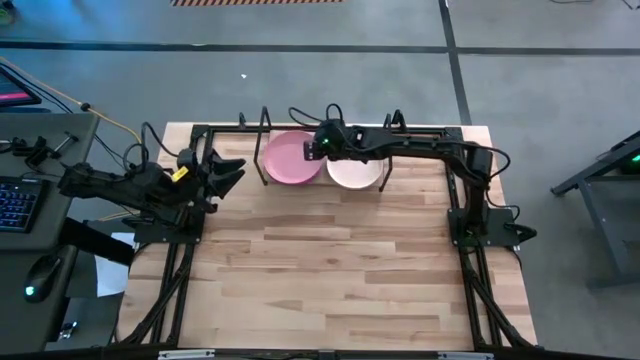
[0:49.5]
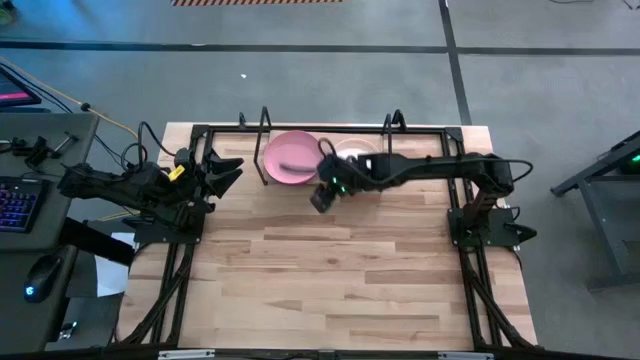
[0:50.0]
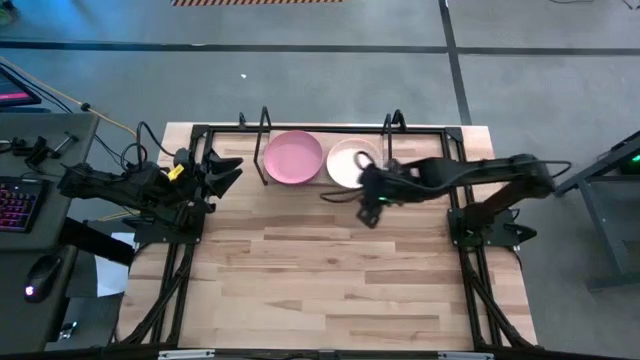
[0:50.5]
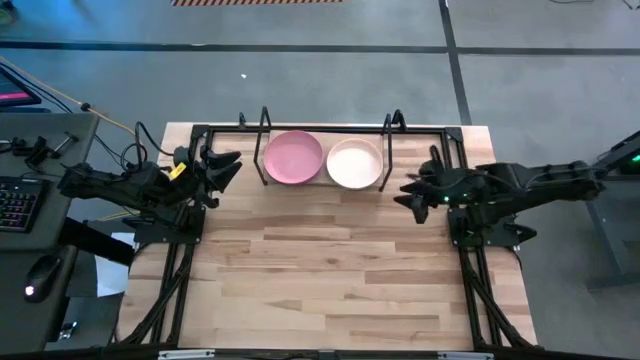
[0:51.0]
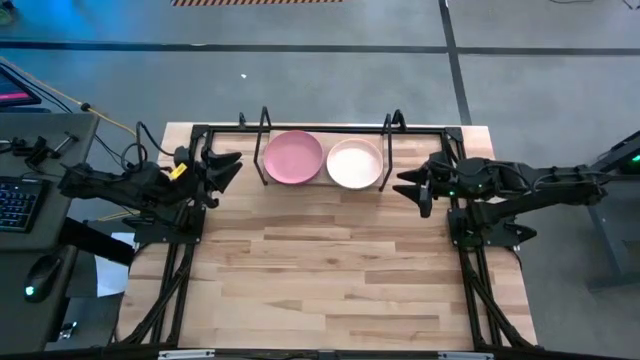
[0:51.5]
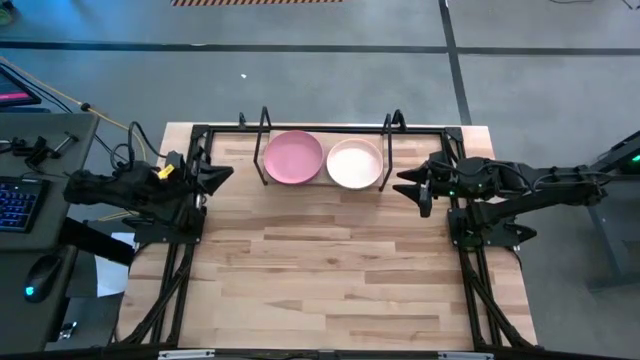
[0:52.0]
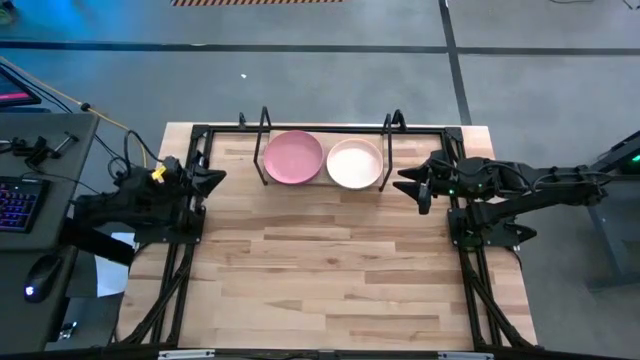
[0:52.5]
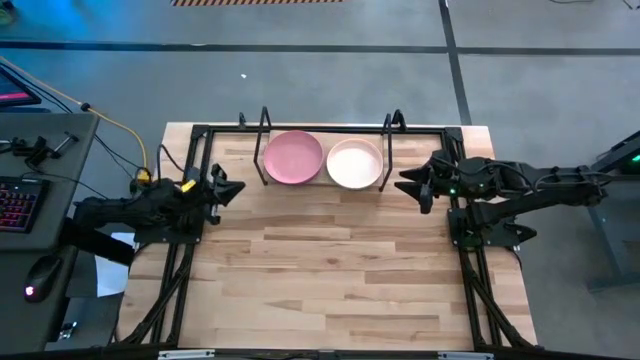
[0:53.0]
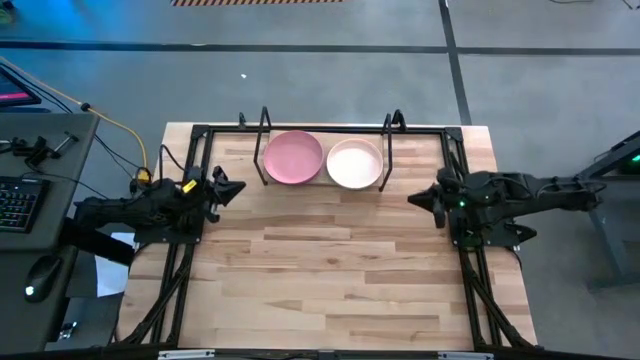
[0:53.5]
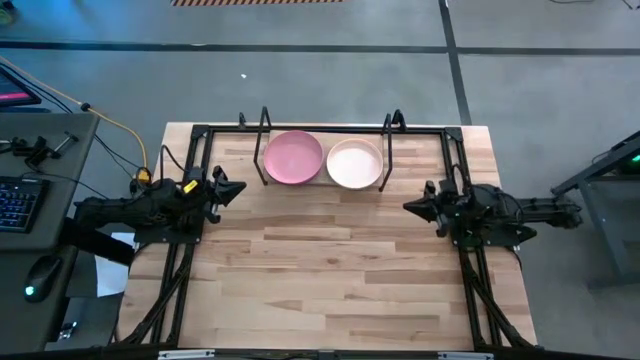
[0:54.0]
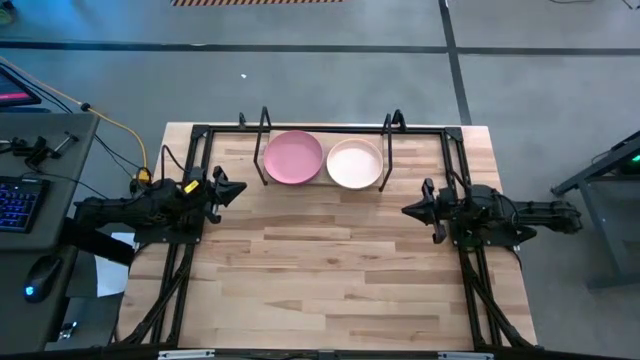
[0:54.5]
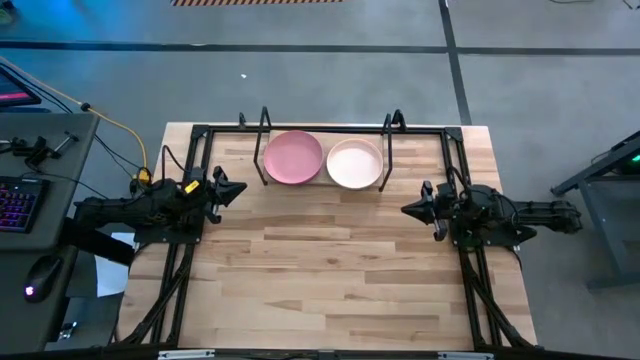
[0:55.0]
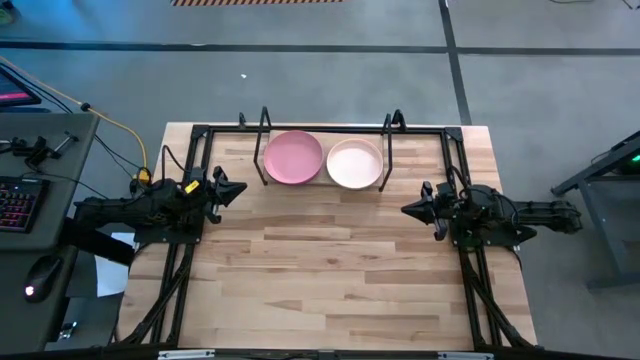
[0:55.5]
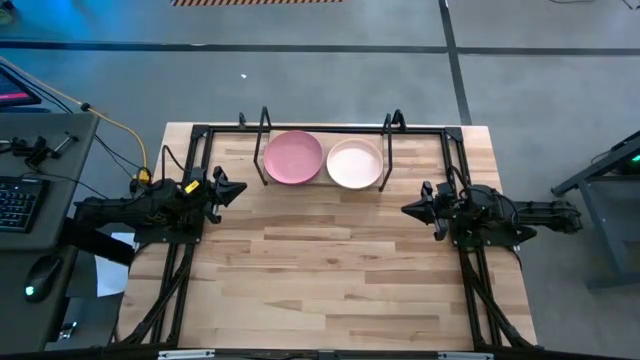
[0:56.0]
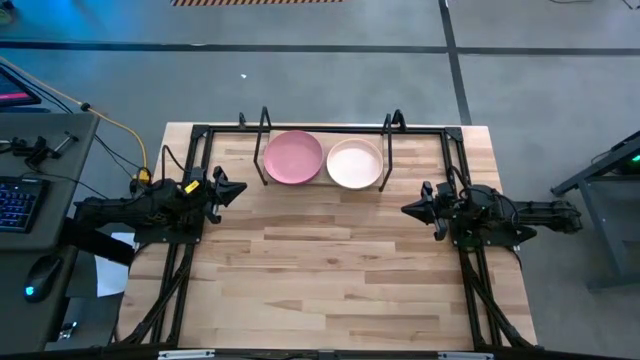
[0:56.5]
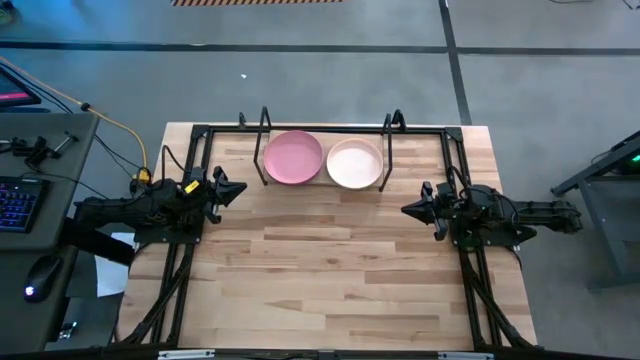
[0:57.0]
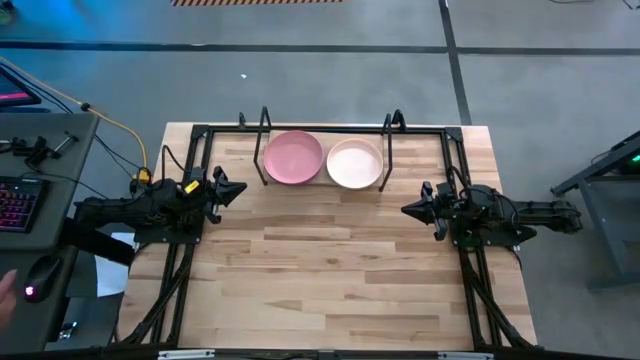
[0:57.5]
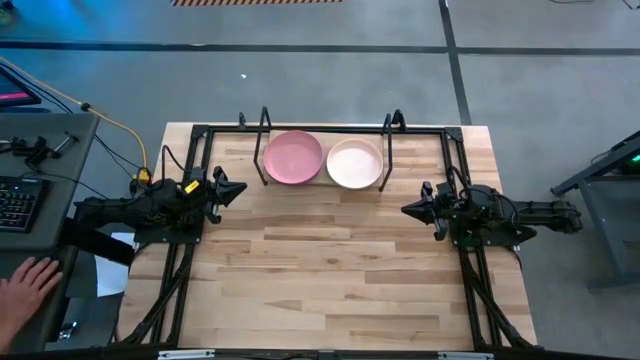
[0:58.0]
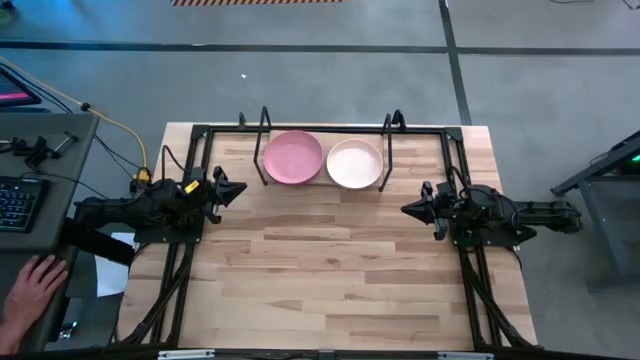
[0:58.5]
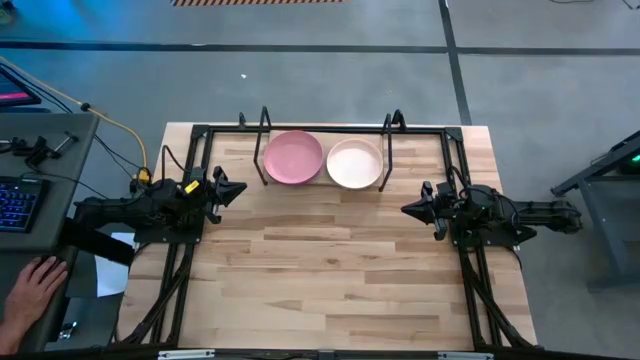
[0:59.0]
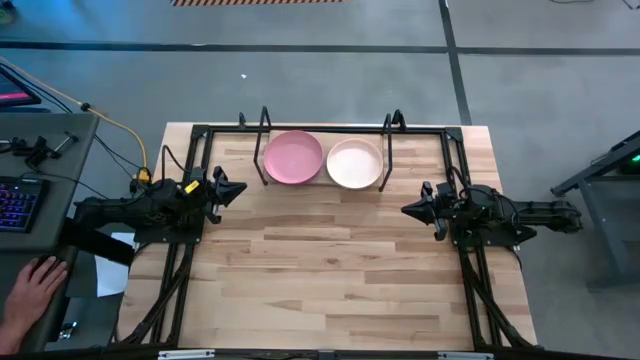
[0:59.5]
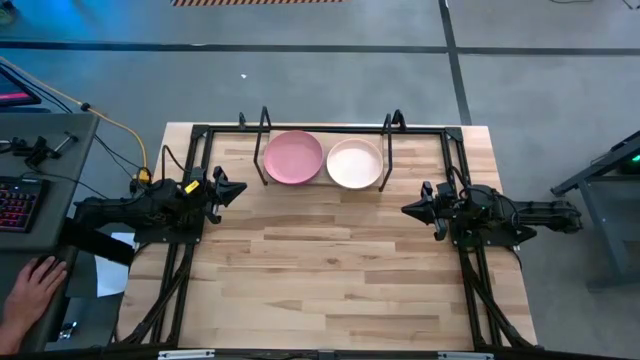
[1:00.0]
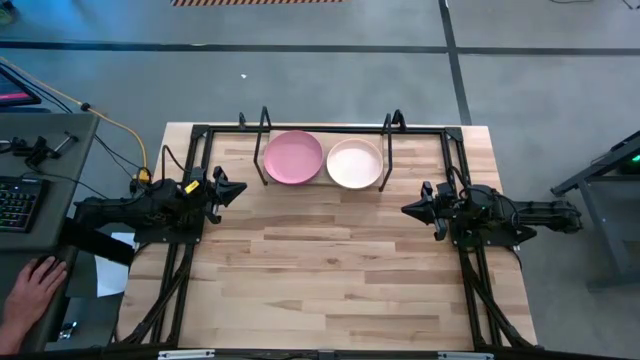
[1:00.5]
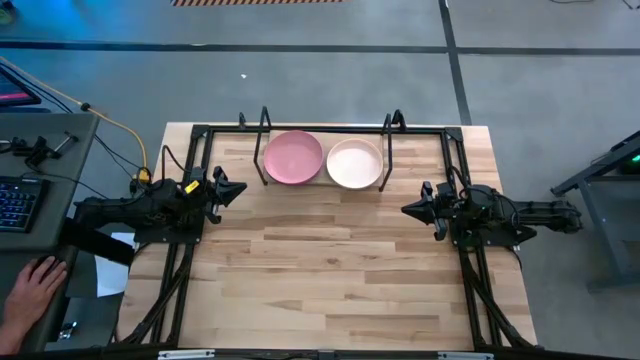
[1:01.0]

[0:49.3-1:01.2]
Task: Place and stack plates onto a shelf
Return to Home Position

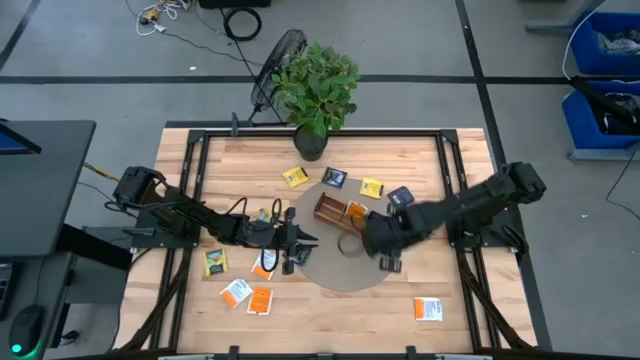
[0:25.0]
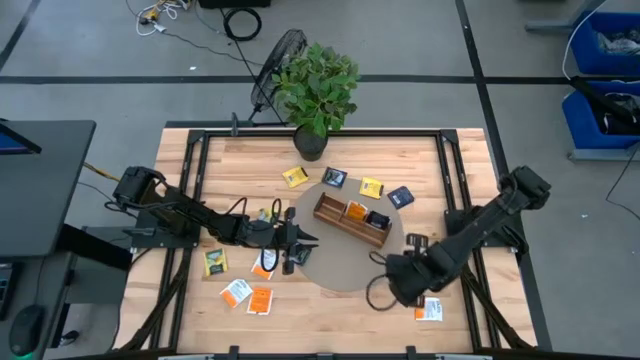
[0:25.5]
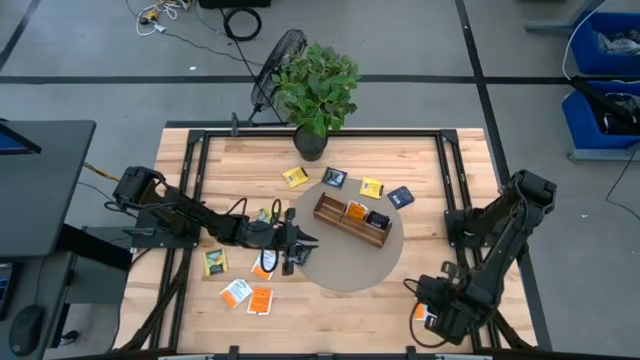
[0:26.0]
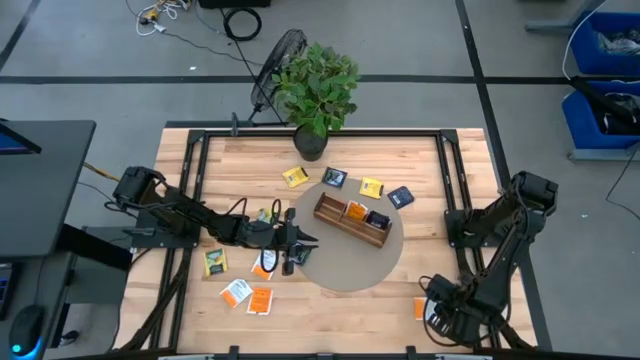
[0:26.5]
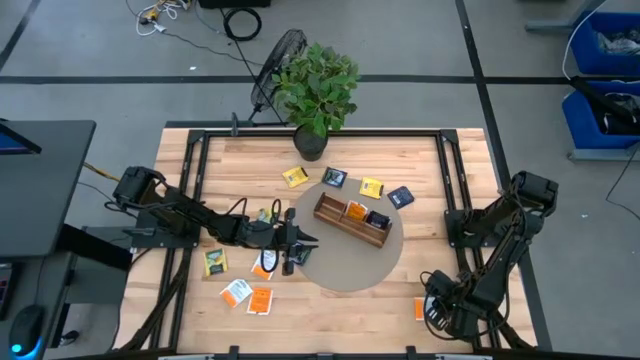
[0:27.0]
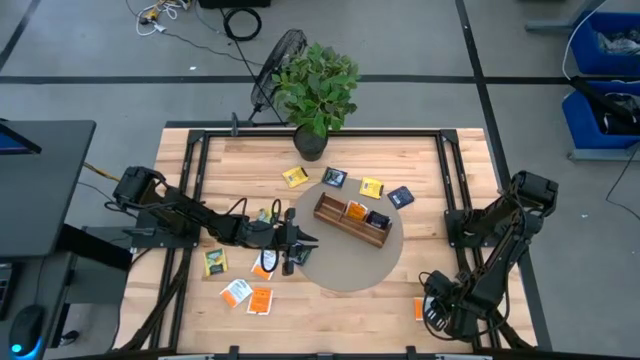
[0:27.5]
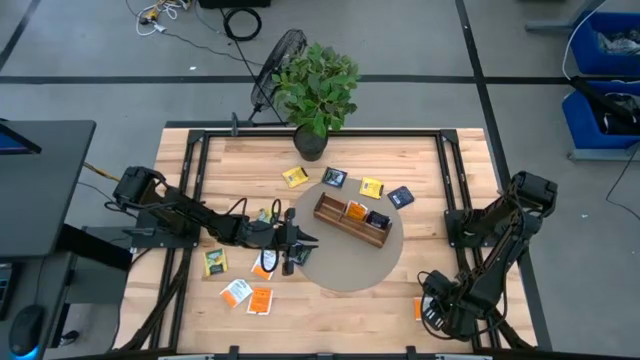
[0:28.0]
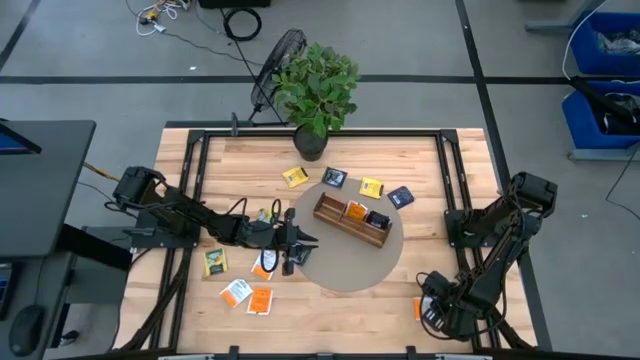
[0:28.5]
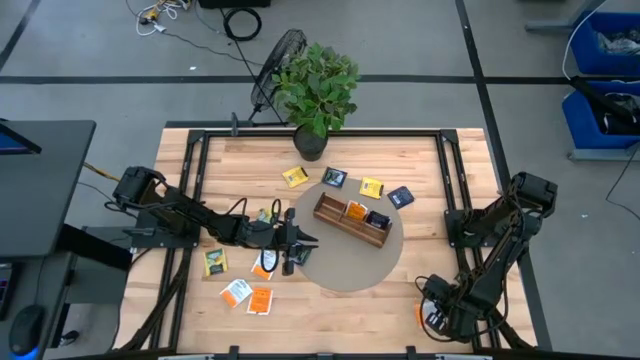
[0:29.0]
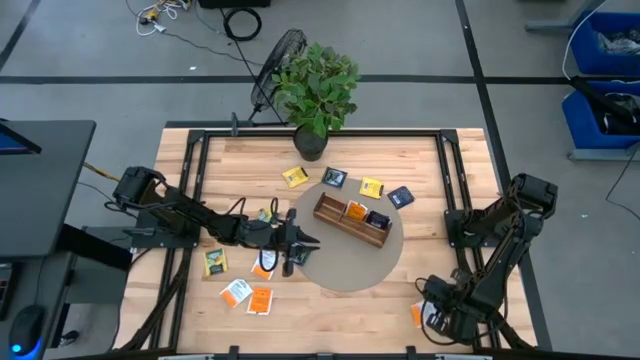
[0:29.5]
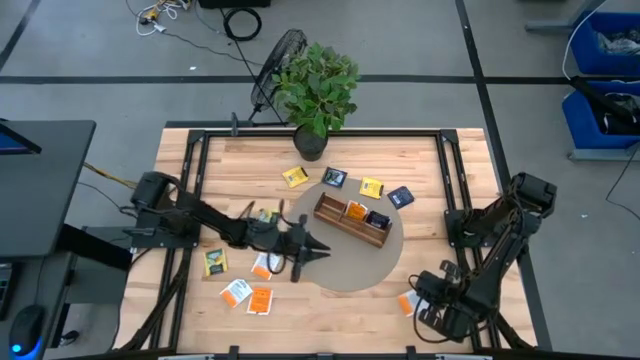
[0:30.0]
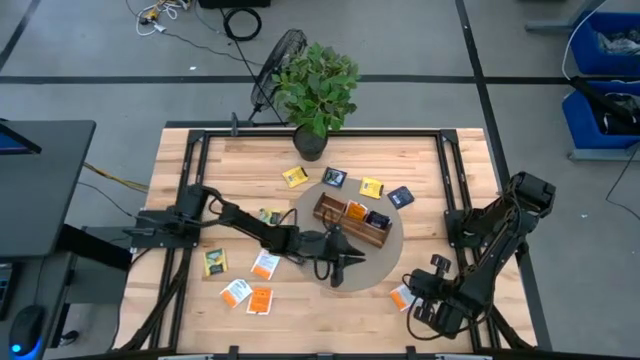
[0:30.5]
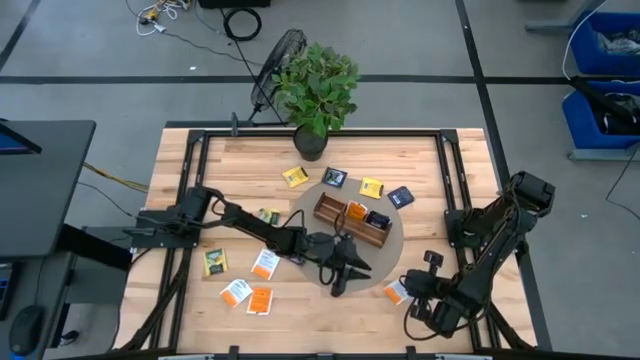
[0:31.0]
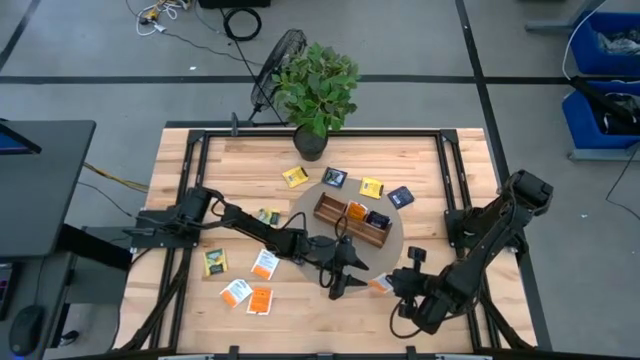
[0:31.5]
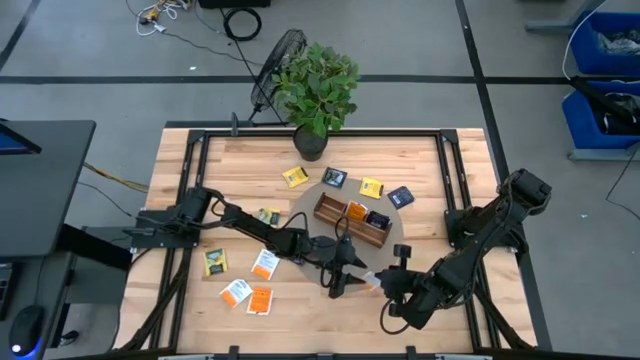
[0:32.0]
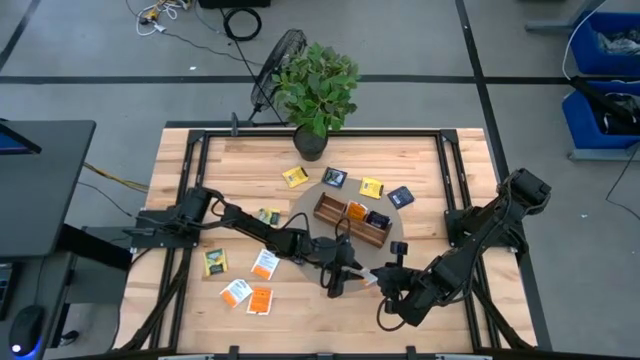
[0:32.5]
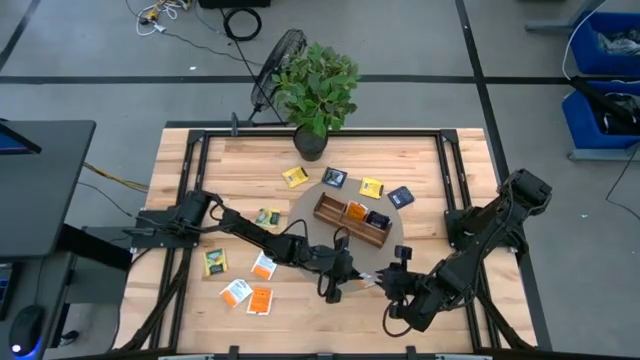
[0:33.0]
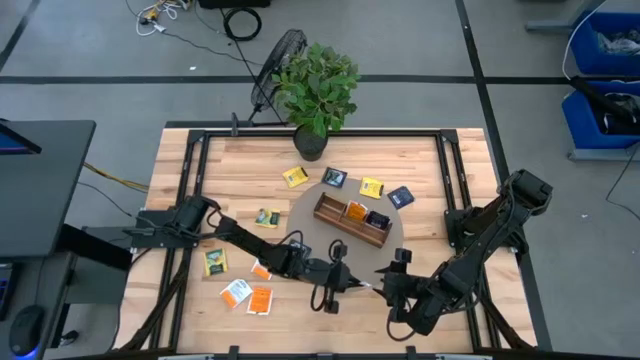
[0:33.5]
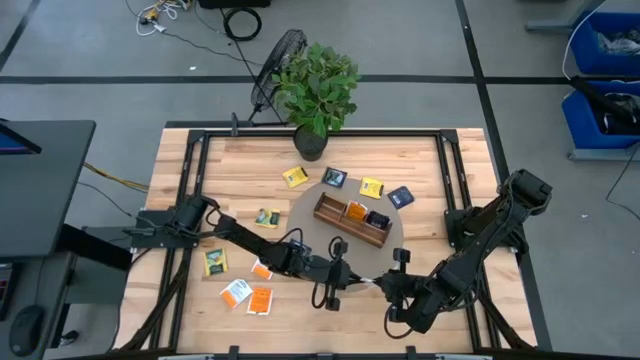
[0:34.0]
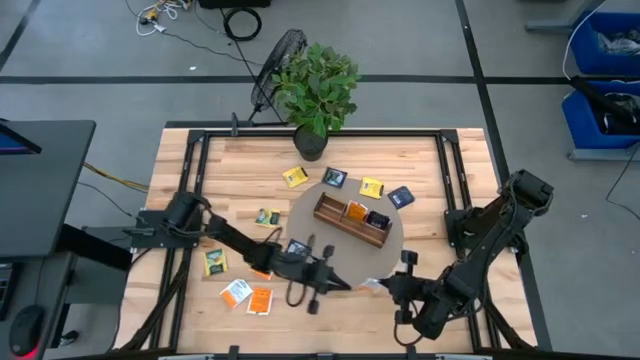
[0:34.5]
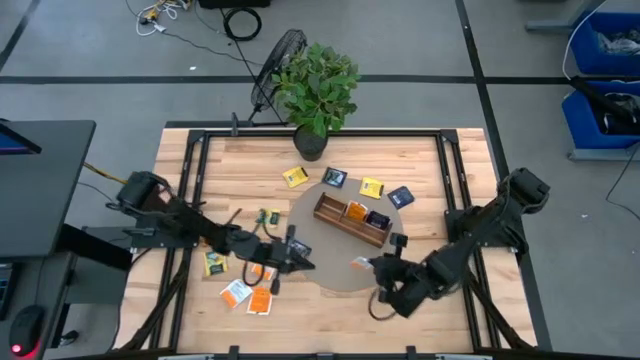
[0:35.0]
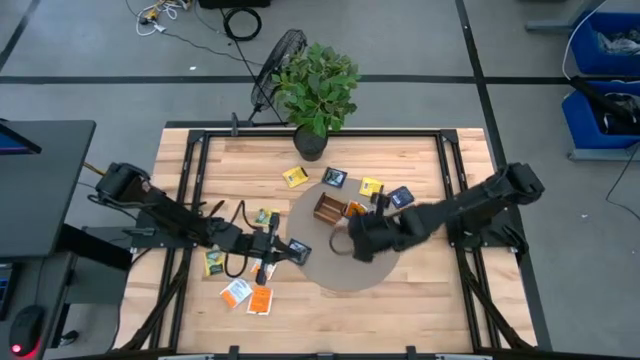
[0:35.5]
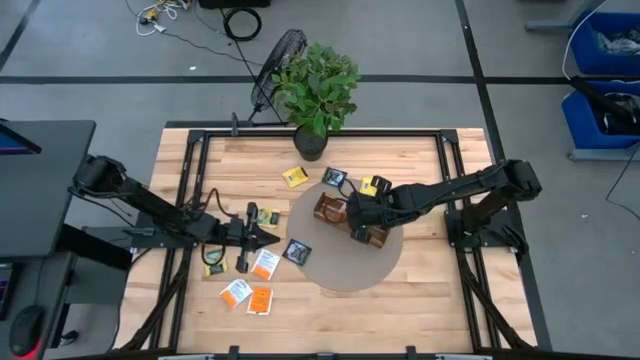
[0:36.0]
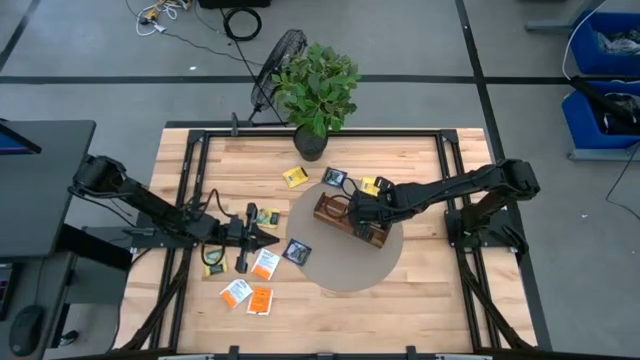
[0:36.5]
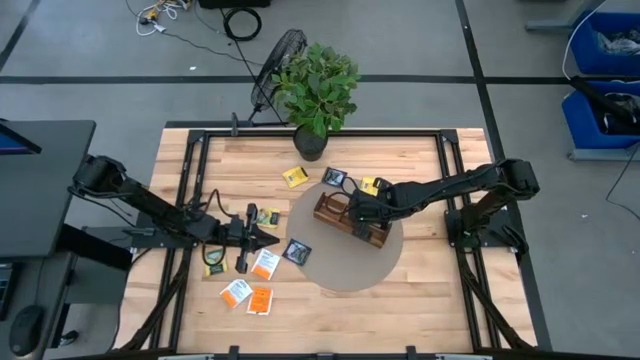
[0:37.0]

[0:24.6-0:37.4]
Task: Pick & Place Tea
Put the orange tea bag into the middle section of the wooden organizer
